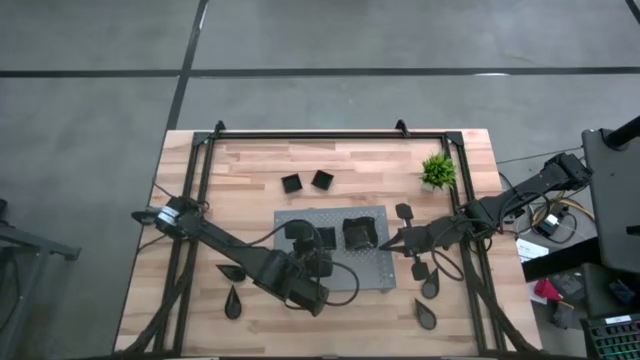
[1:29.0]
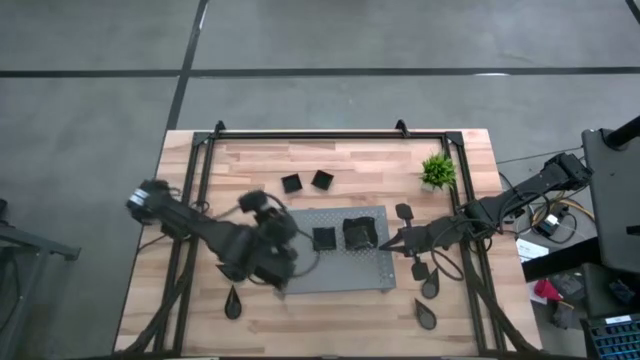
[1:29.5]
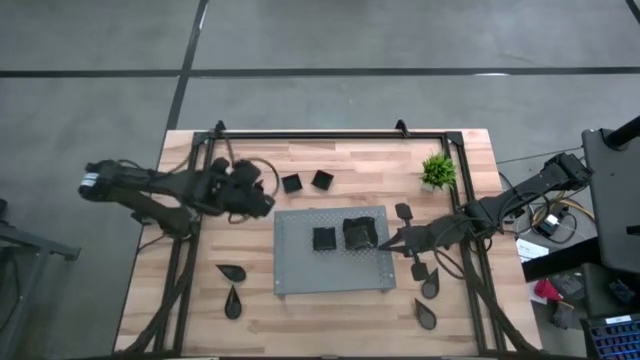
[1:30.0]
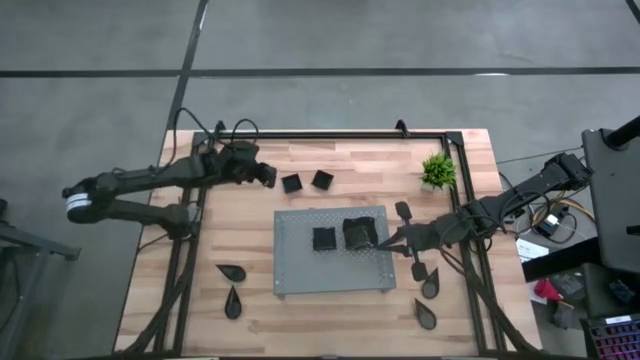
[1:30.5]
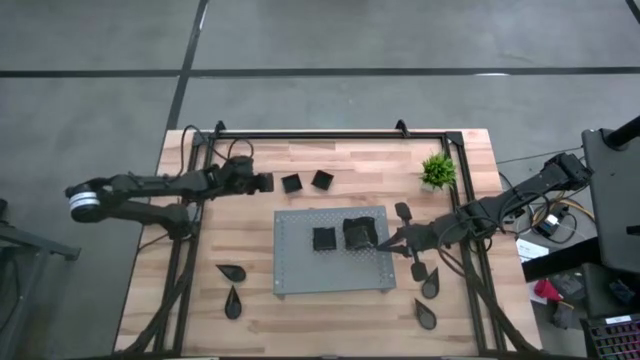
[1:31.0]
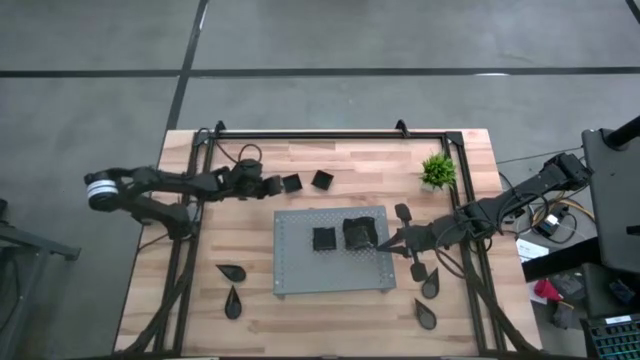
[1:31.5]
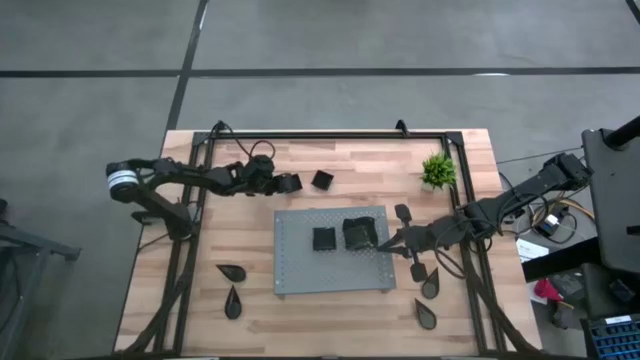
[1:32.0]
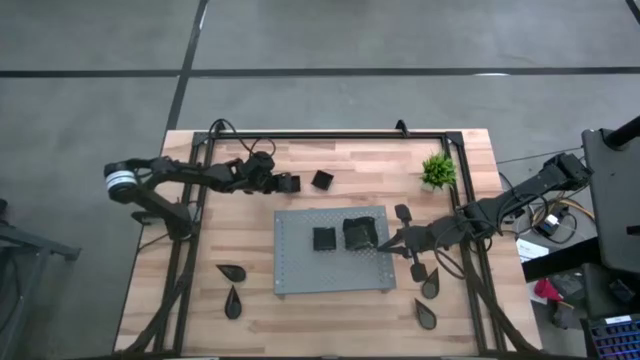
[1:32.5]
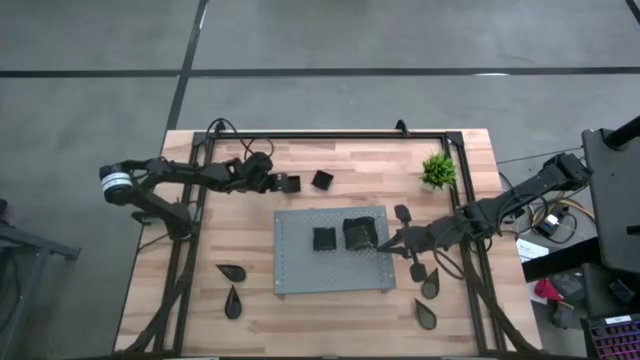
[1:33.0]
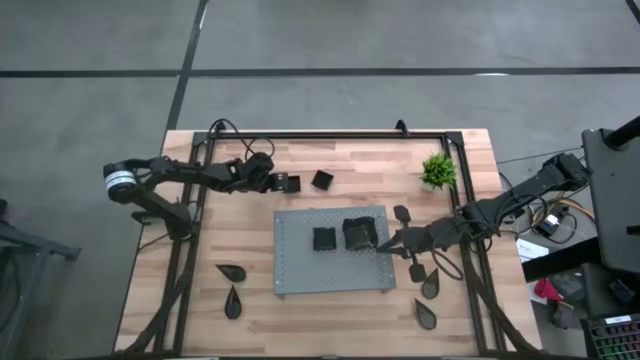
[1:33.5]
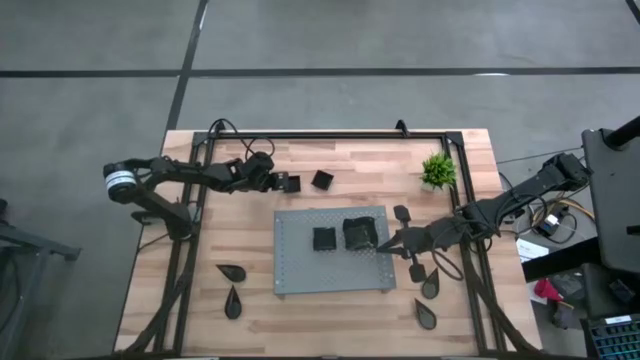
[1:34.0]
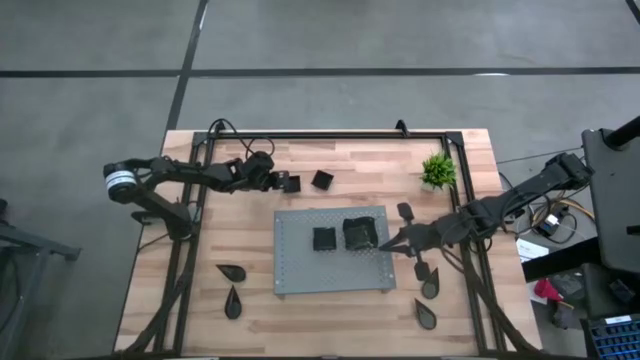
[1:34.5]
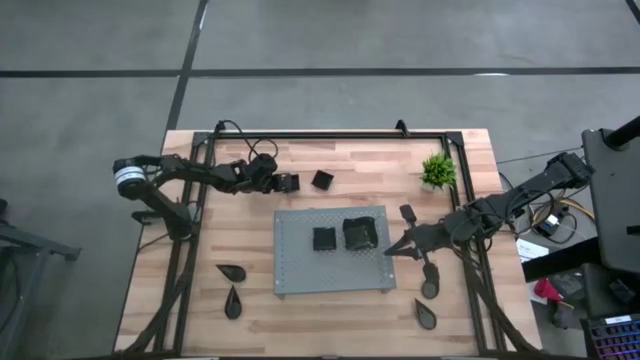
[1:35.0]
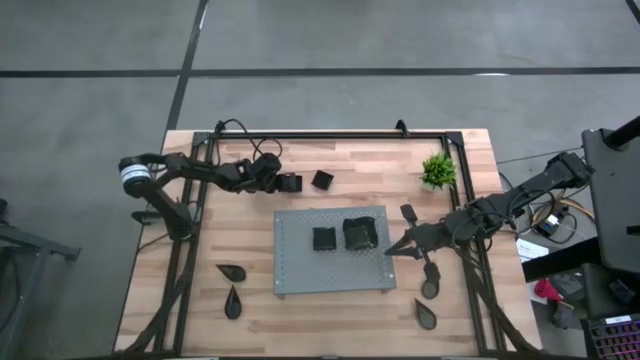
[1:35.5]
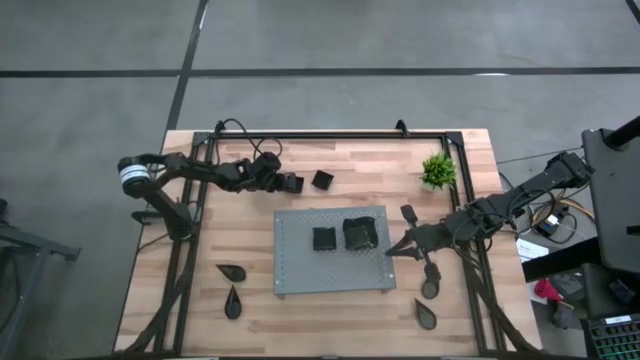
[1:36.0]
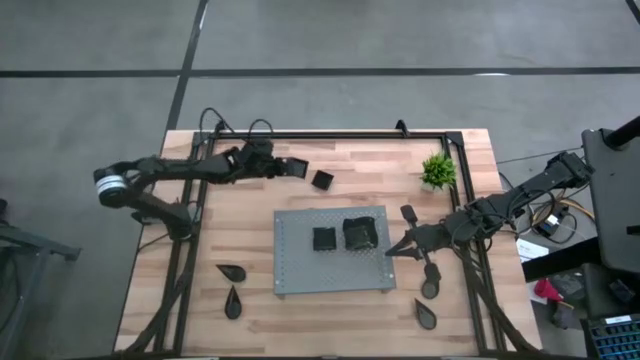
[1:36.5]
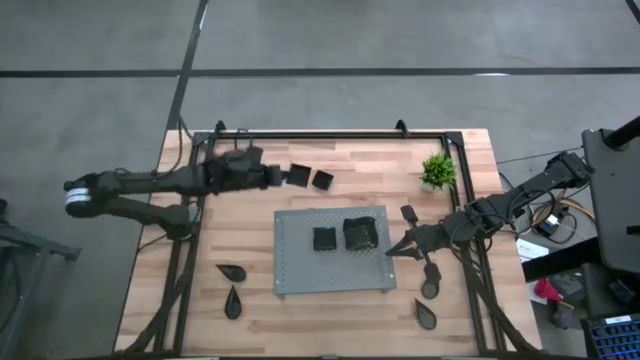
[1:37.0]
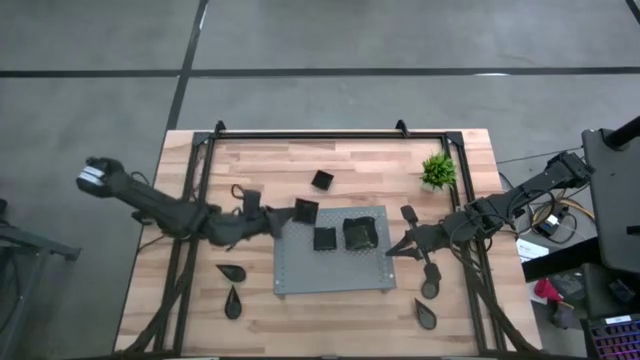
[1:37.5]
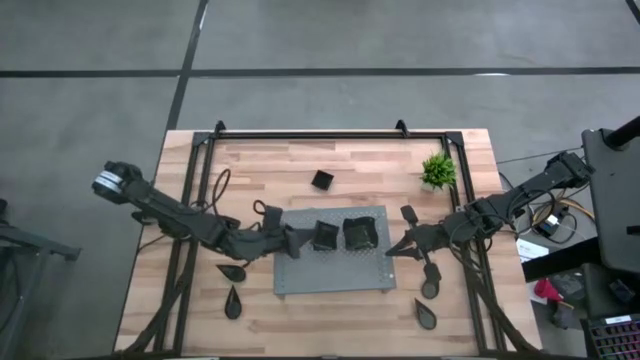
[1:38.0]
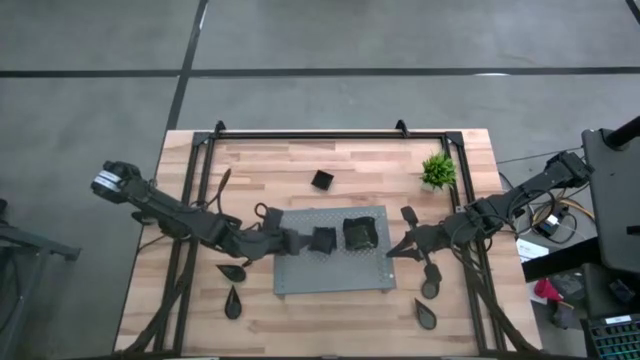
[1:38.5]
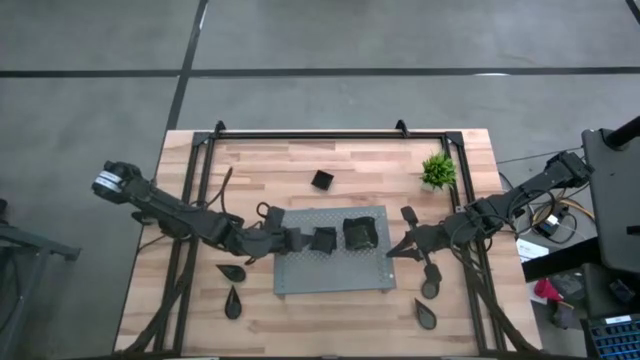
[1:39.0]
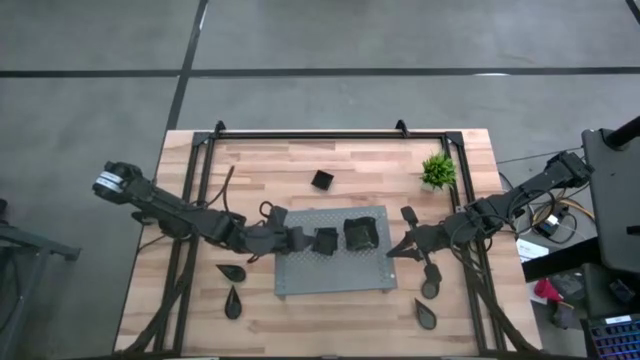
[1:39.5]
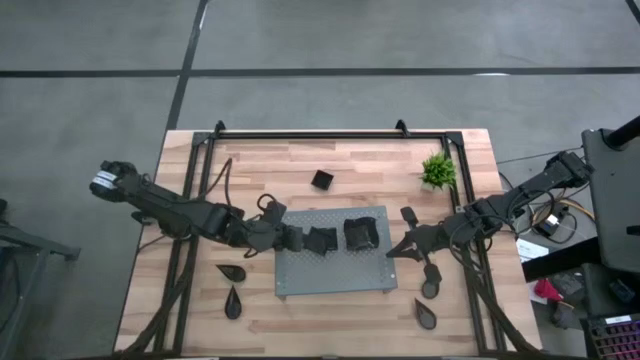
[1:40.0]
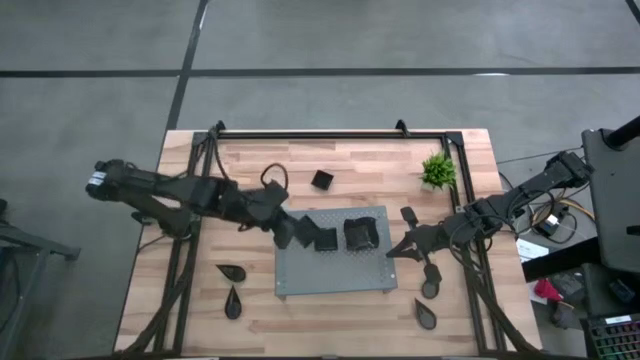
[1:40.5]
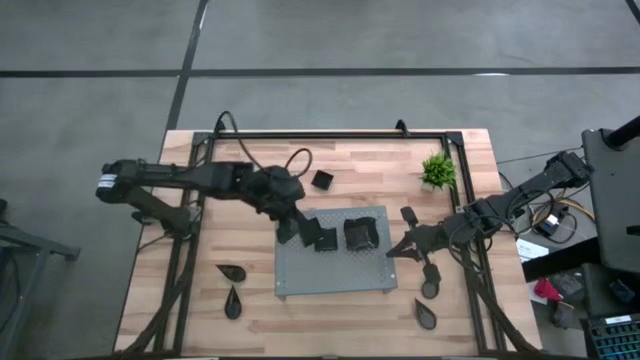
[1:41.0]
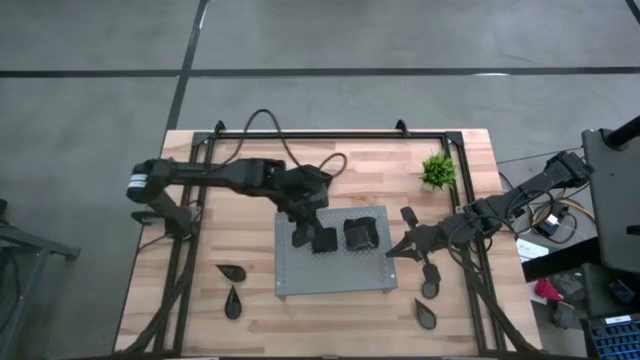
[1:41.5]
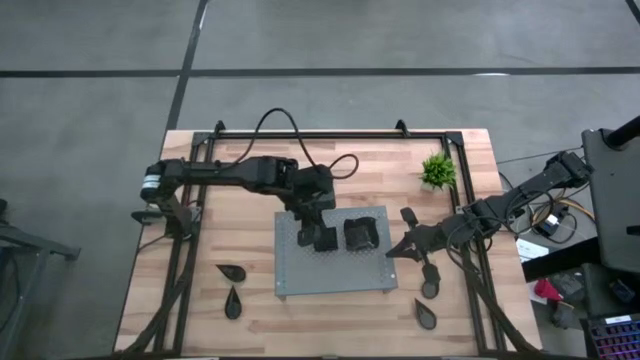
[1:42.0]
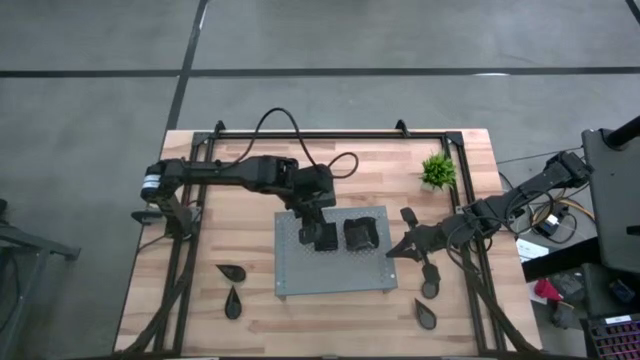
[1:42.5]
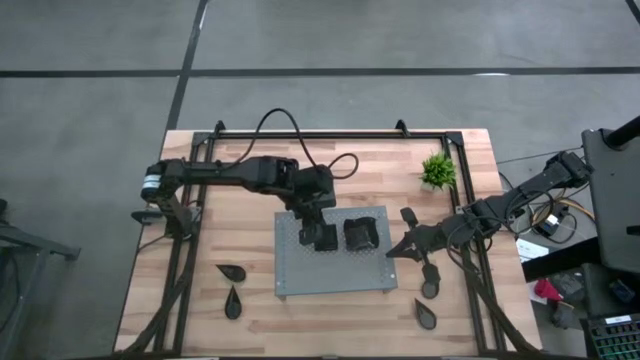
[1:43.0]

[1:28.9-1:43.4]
Task: Pick & Place Mini shaped plates
Stack the square plate on top of the square plate on the shelf

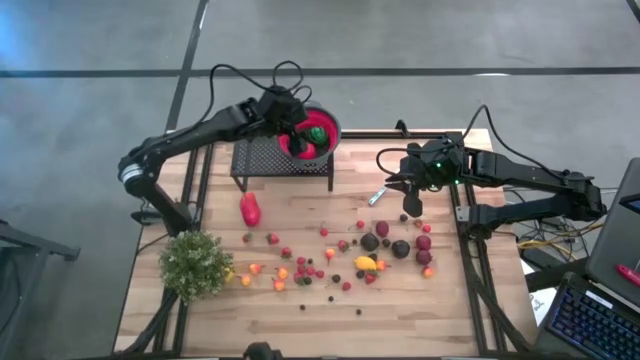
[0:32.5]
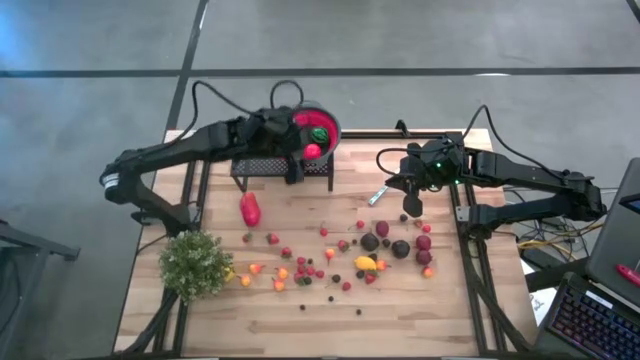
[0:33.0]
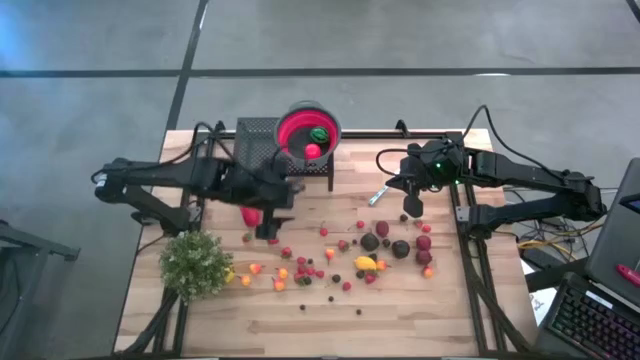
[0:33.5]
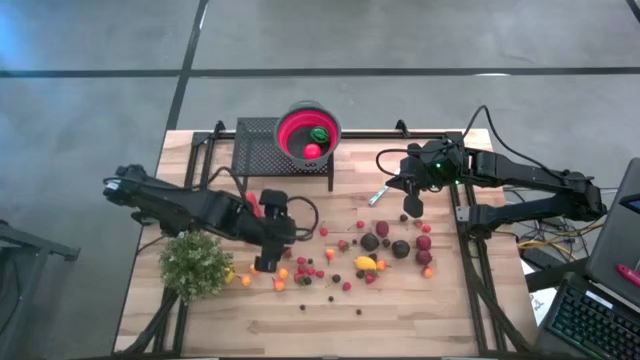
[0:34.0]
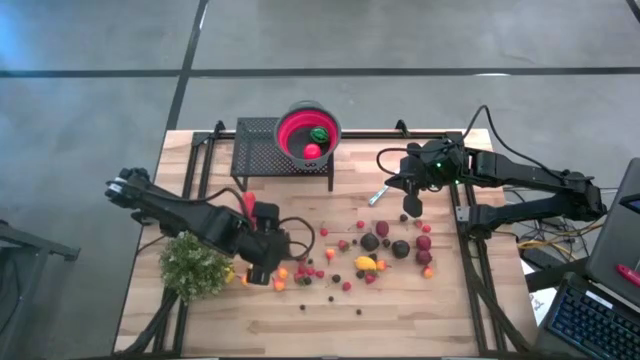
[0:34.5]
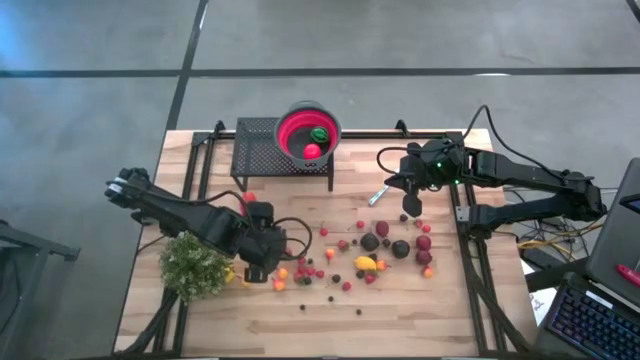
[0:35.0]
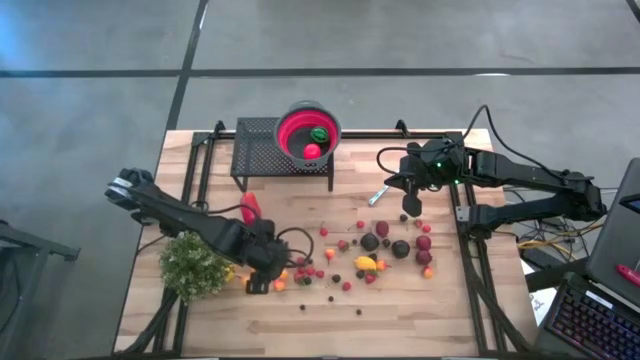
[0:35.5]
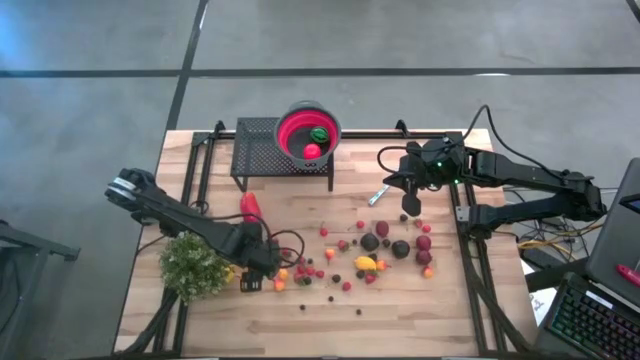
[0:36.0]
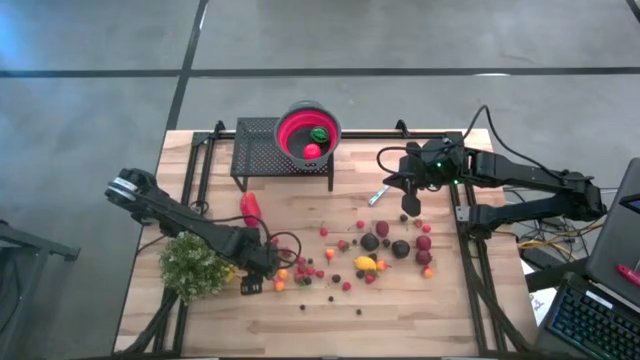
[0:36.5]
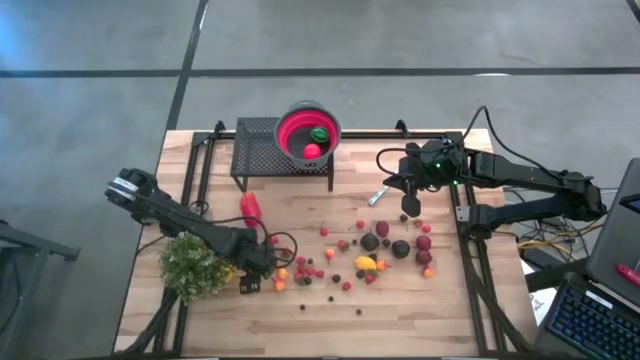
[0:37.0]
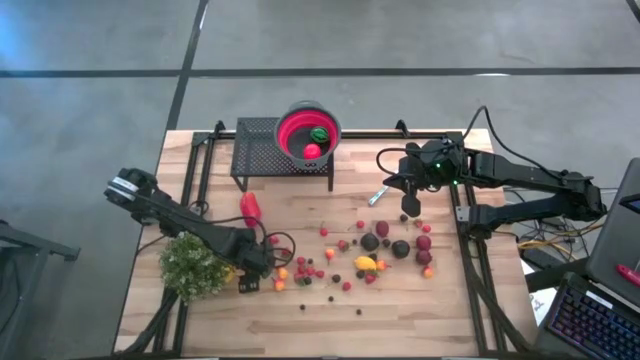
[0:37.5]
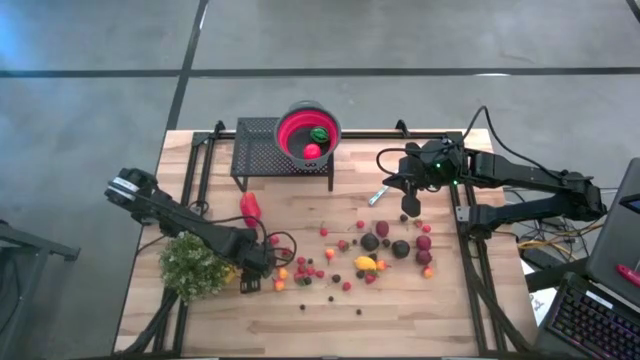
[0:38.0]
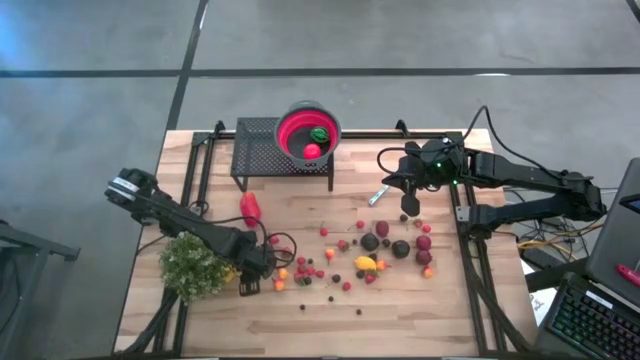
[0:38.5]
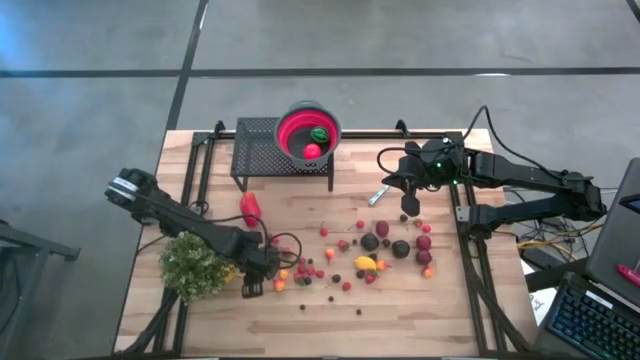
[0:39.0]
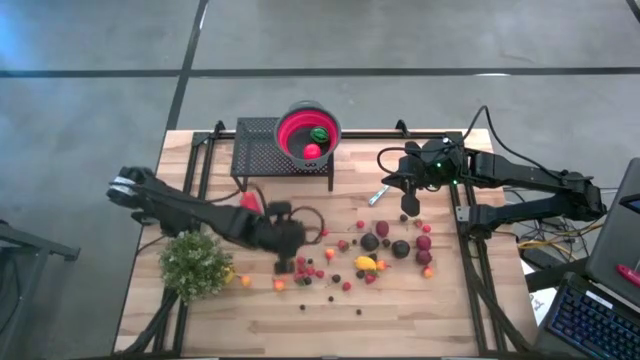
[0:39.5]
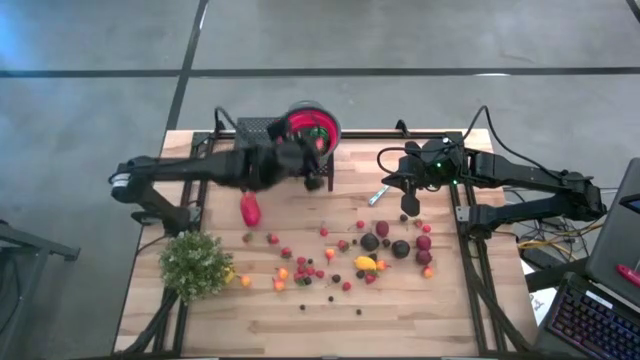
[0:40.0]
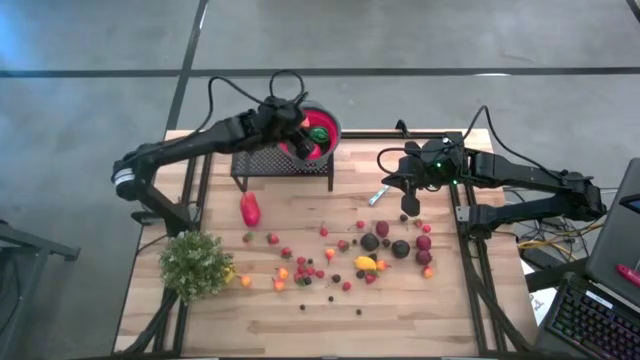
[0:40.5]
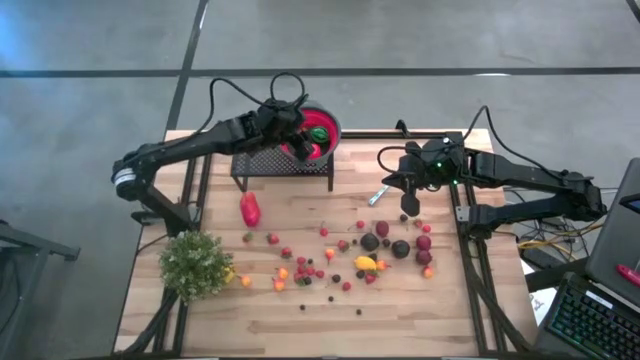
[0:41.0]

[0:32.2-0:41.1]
Task: Pick & Place Fruit
Put the orange pear into the red gray strainer bowl on the shelf
